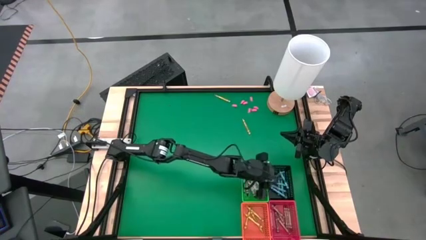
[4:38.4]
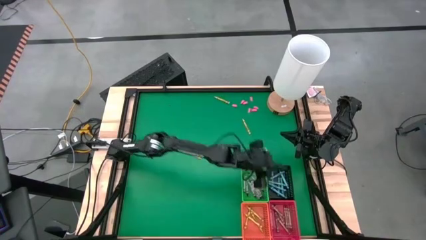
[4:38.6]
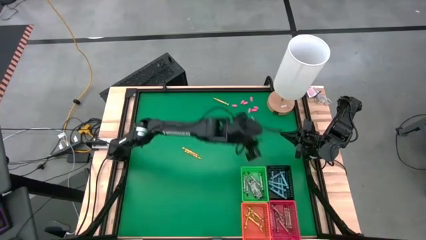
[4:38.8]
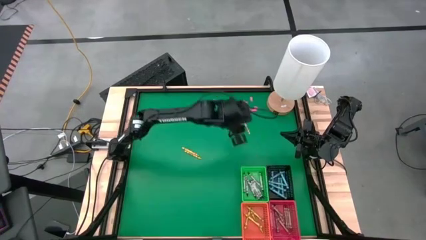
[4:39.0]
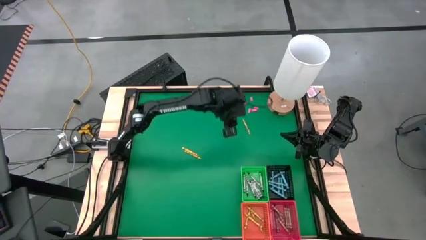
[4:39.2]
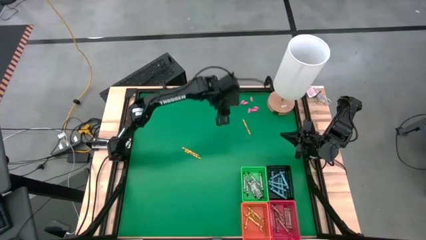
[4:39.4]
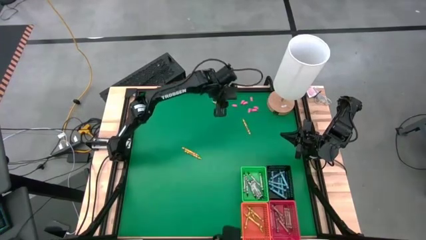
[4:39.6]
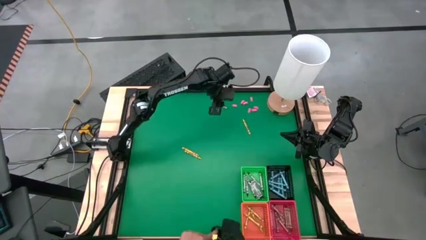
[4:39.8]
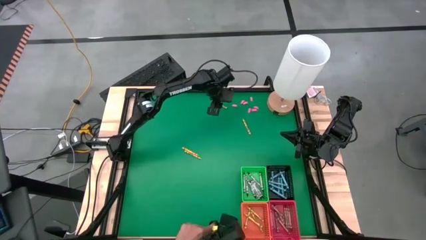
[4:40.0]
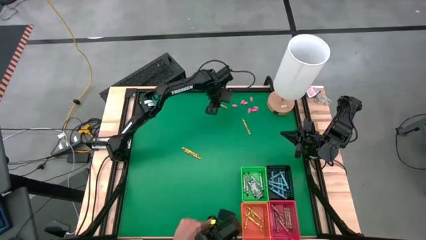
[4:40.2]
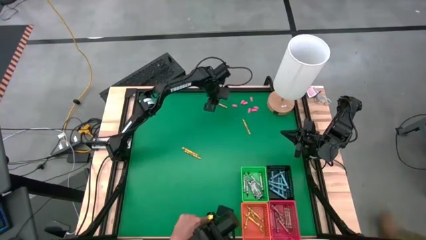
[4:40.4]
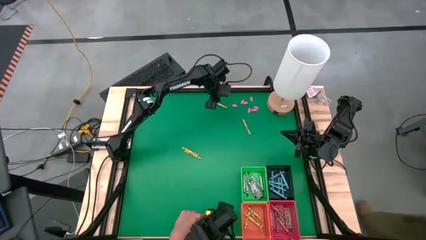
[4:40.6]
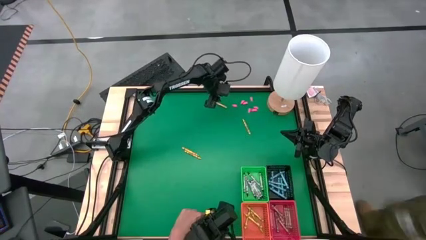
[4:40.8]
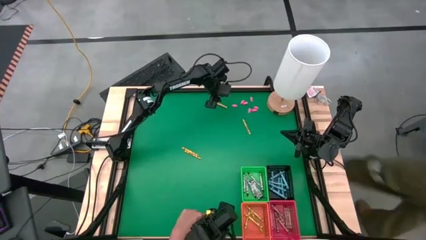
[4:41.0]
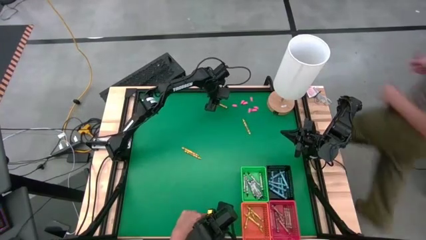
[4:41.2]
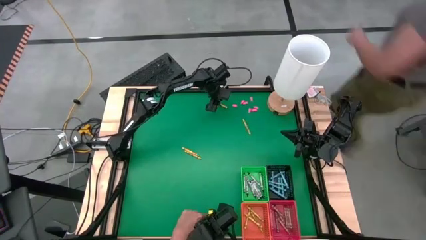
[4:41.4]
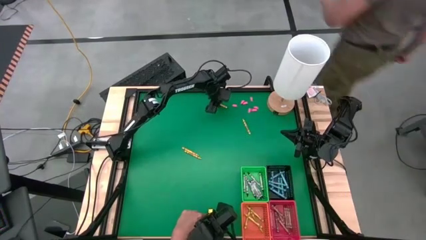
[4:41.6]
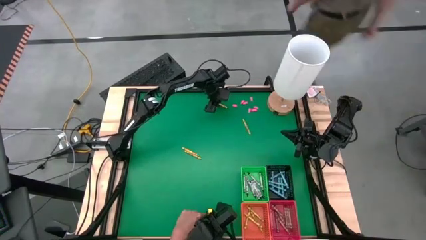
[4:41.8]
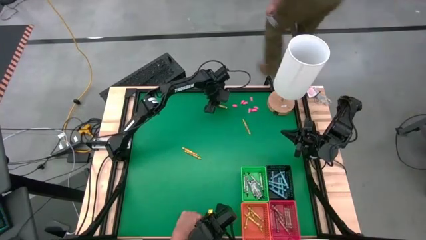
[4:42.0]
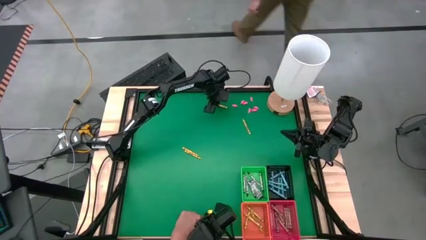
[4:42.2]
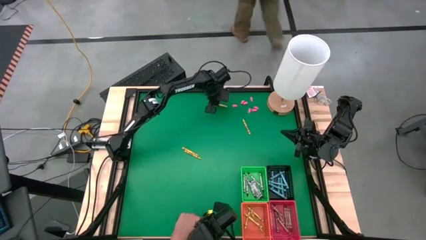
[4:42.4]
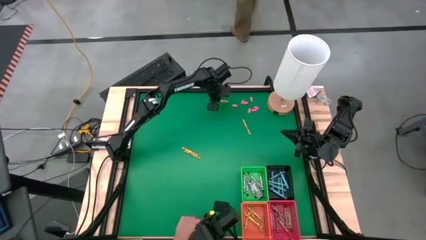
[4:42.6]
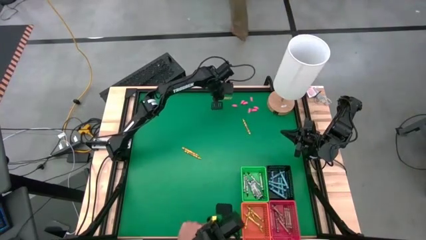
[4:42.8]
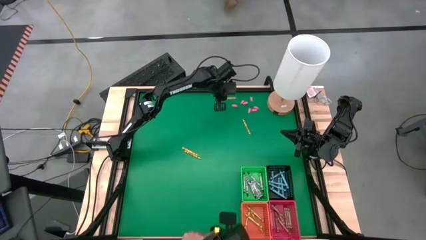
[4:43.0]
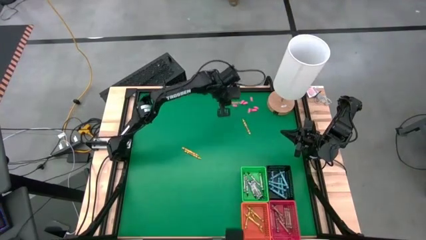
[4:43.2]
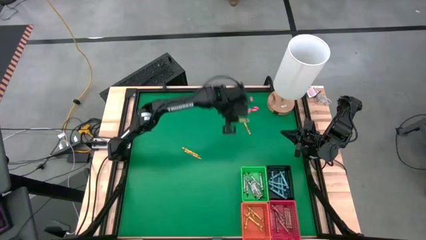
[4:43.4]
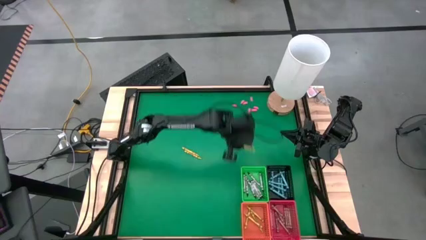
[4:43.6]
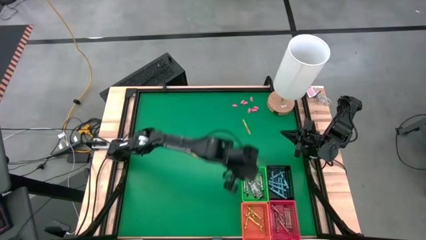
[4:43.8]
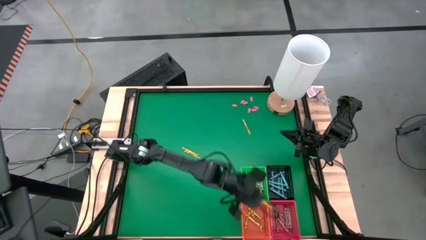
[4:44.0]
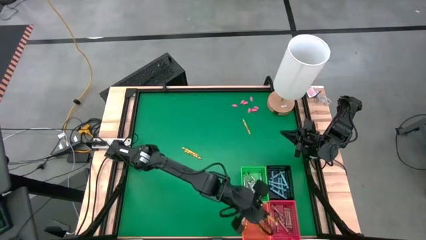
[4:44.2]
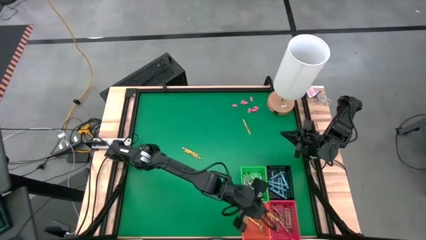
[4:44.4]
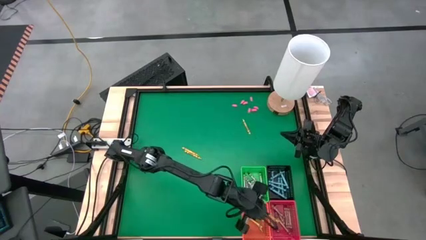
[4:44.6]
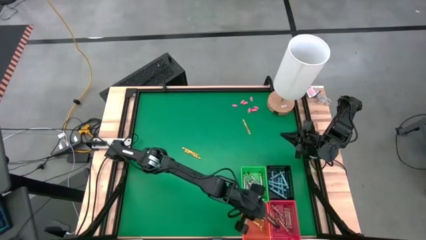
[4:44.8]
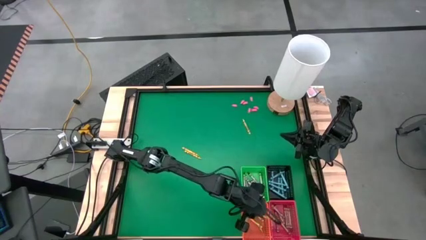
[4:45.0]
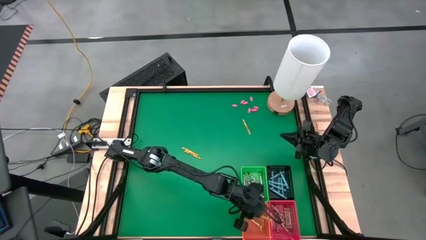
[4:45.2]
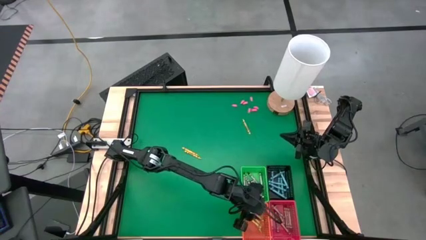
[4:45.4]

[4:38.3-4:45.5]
Task: Sort crayons
Put the light green crayon into the orange bin

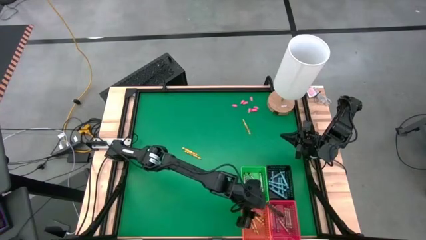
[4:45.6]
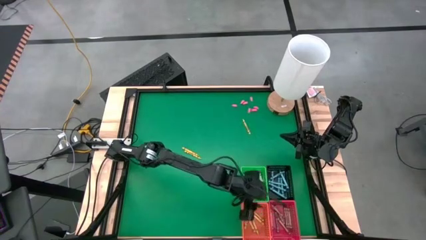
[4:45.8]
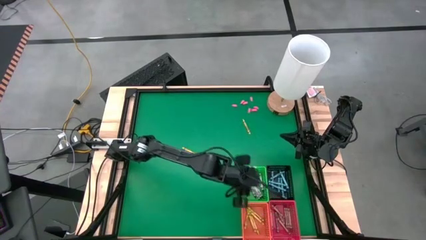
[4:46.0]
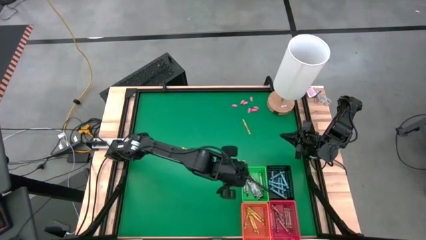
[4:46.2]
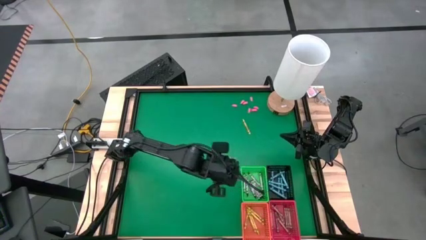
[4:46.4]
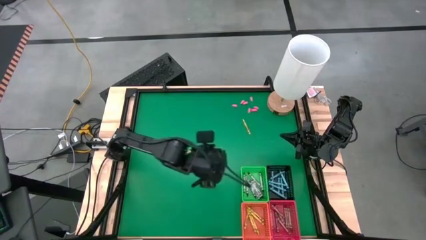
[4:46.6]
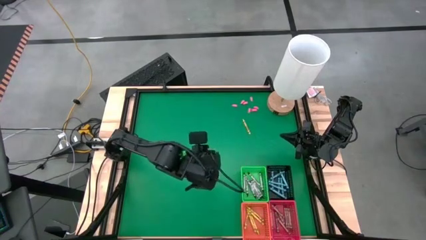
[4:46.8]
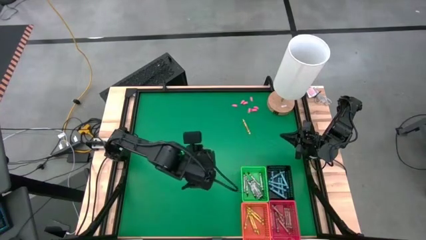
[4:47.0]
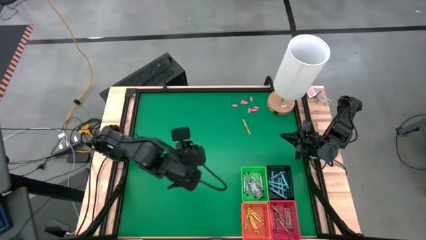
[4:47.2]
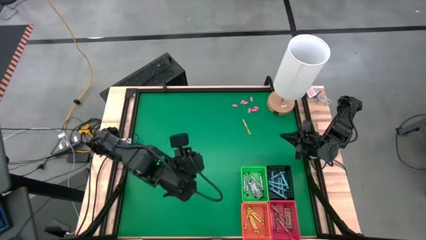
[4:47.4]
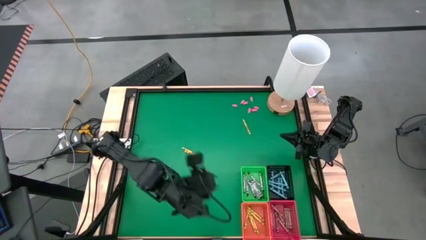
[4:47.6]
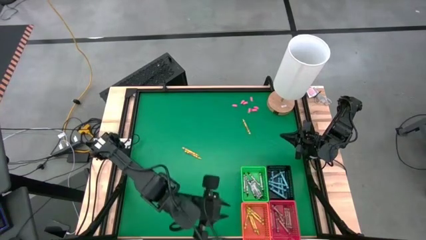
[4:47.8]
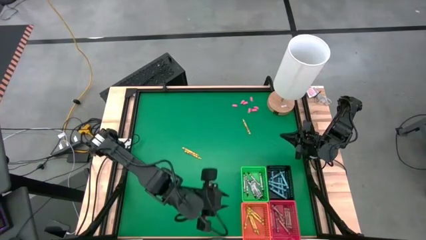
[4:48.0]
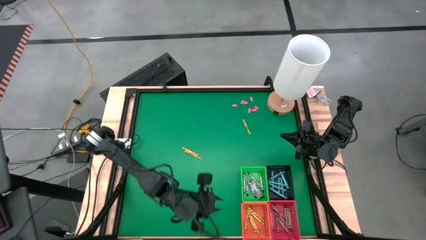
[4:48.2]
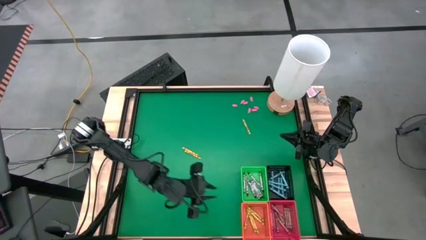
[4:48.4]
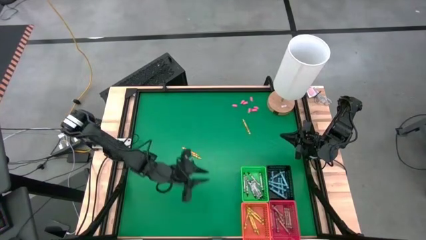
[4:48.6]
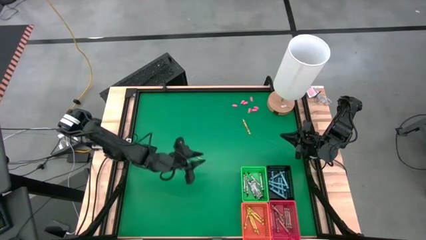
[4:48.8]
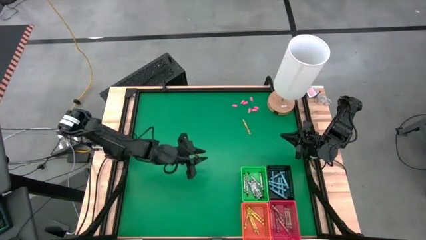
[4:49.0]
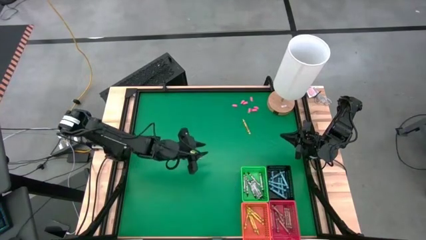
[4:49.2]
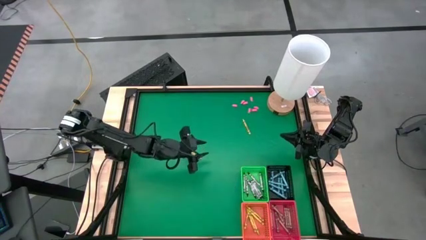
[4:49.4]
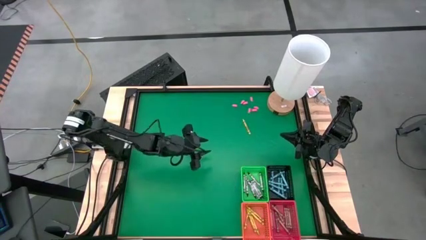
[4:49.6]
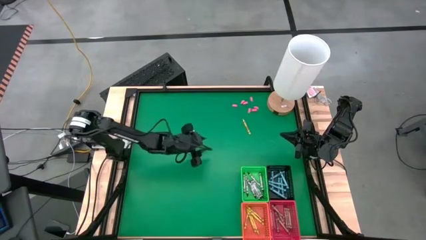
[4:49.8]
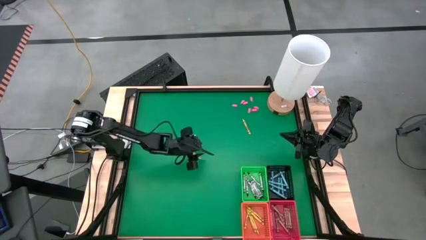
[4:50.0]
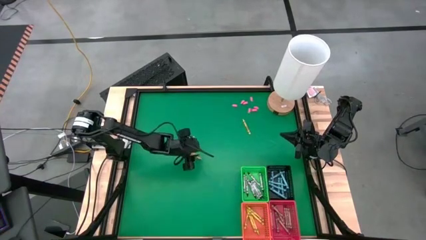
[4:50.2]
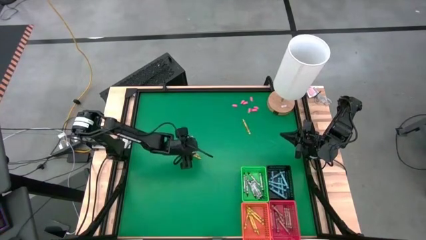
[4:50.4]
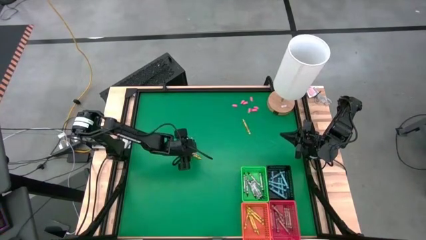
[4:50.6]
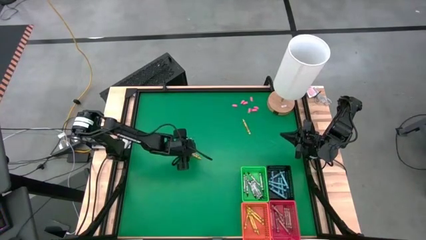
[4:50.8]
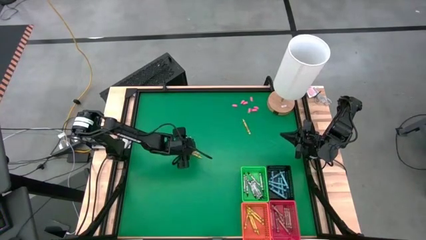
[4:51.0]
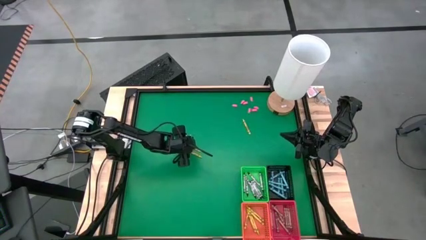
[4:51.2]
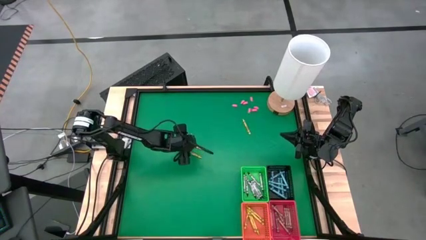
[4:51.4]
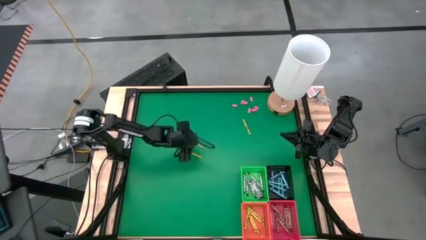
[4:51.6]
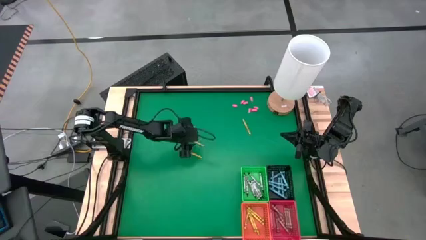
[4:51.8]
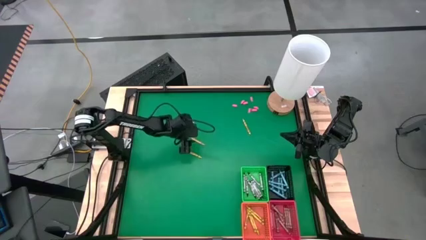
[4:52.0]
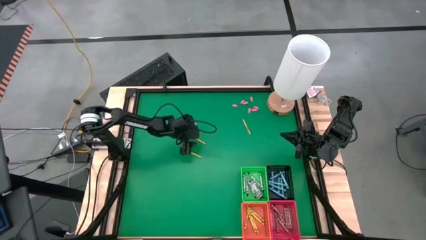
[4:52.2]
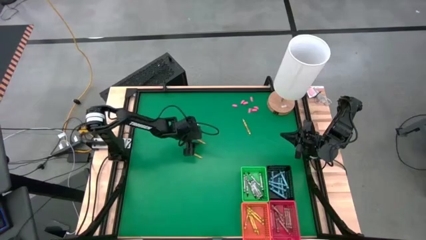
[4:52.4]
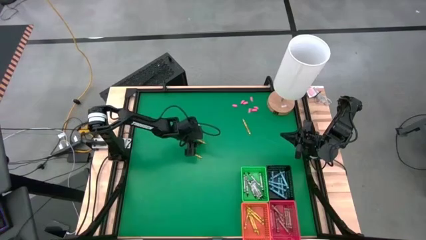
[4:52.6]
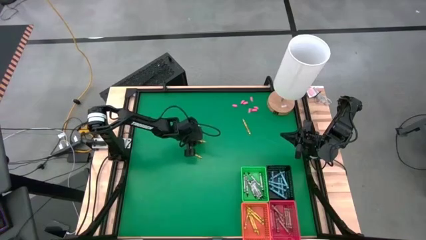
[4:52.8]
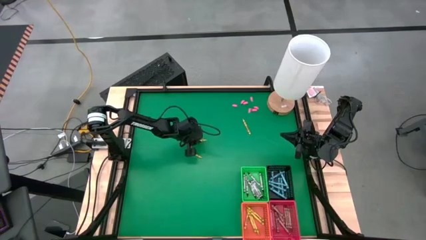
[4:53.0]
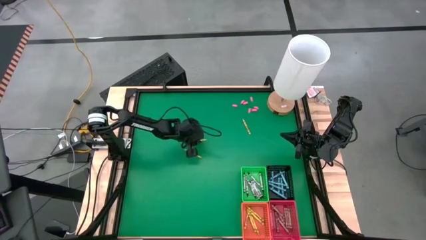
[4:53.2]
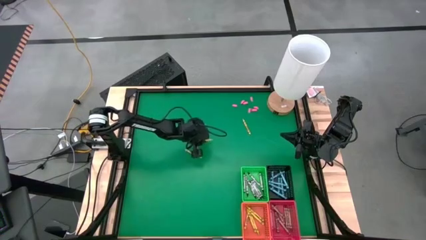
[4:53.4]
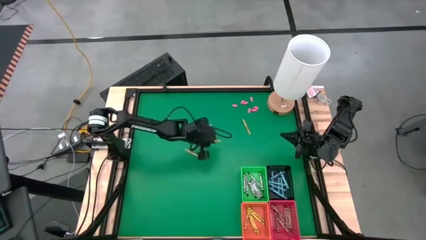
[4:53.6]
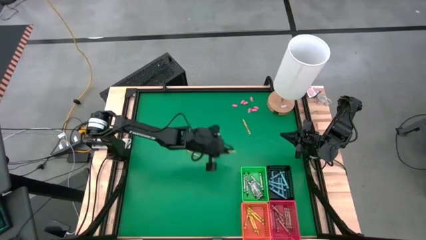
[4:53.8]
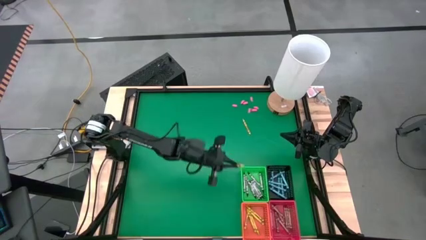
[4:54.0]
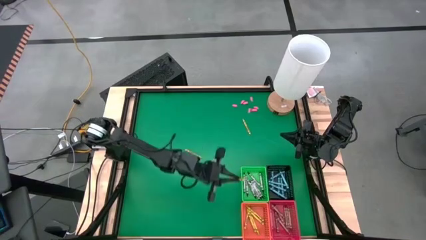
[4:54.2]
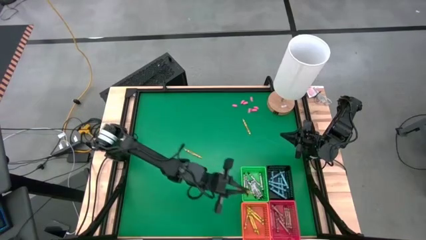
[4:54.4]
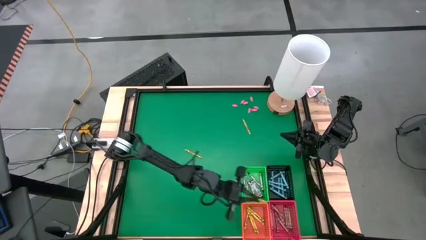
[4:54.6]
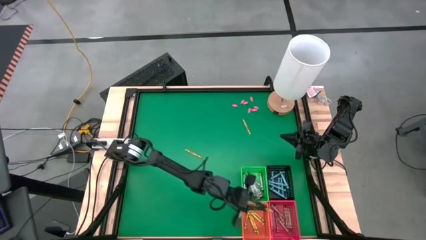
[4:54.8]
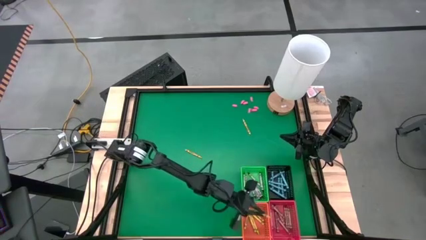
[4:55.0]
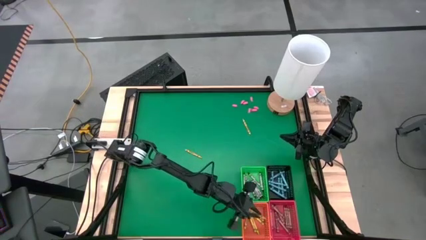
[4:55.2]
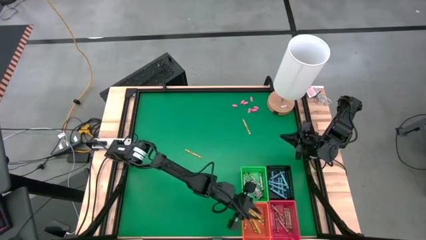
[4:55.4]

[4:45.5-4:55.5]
Put the light green crayon into the orange bin
